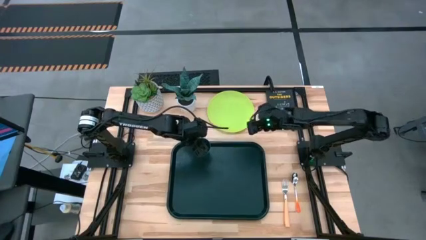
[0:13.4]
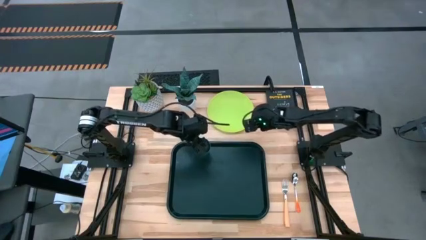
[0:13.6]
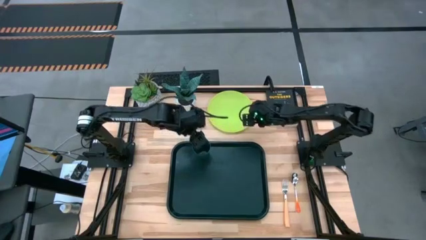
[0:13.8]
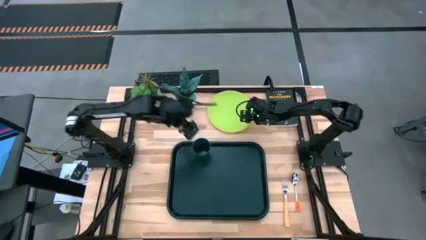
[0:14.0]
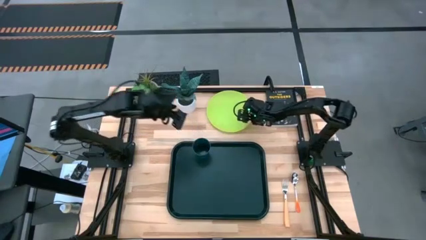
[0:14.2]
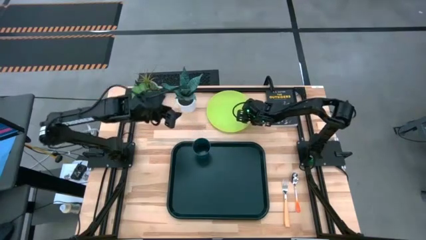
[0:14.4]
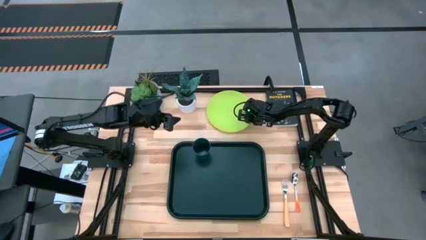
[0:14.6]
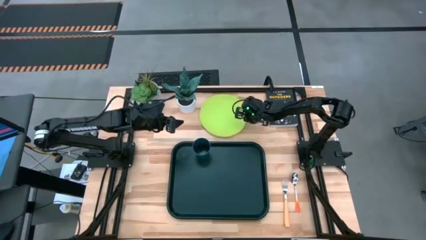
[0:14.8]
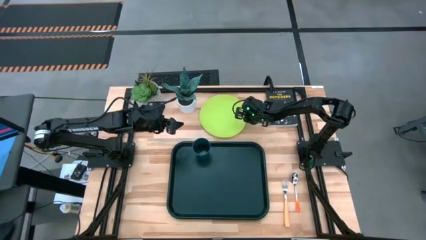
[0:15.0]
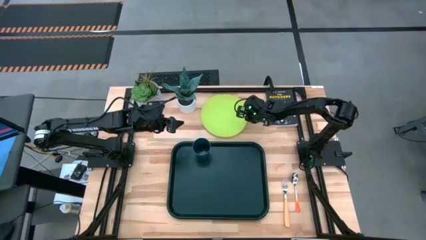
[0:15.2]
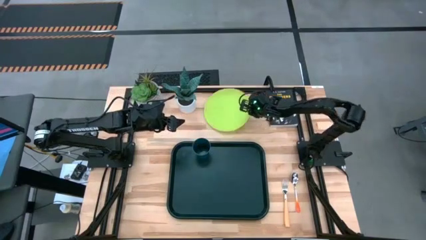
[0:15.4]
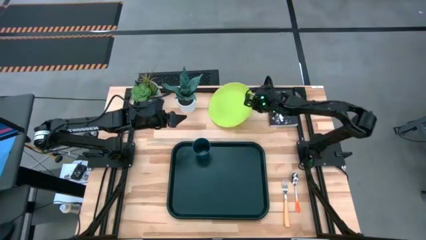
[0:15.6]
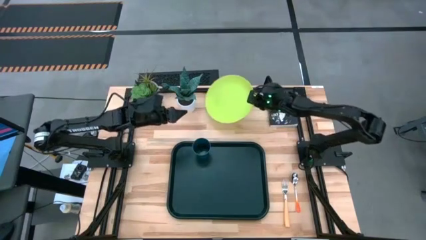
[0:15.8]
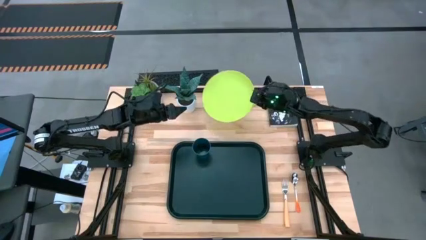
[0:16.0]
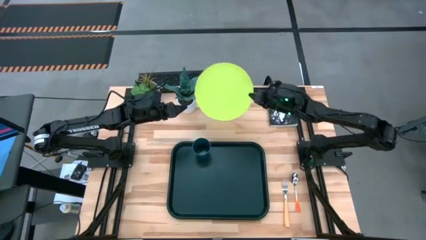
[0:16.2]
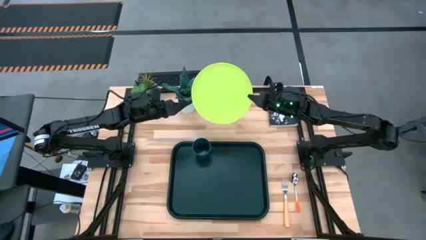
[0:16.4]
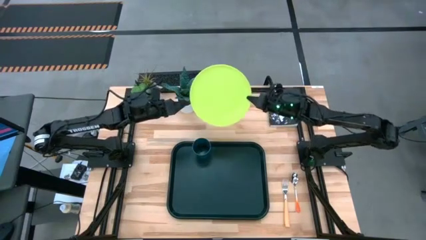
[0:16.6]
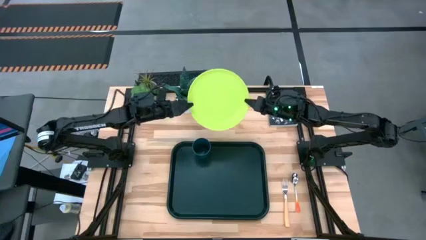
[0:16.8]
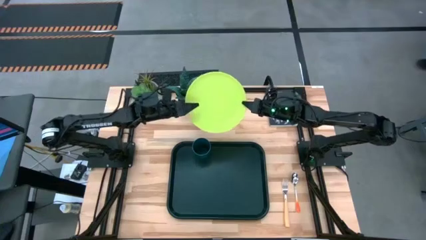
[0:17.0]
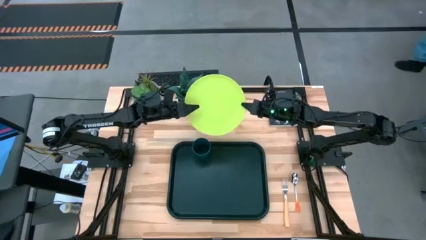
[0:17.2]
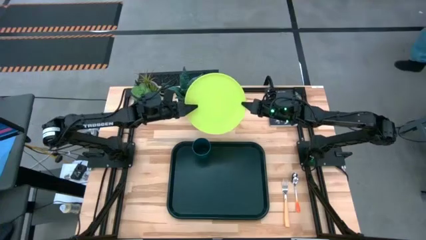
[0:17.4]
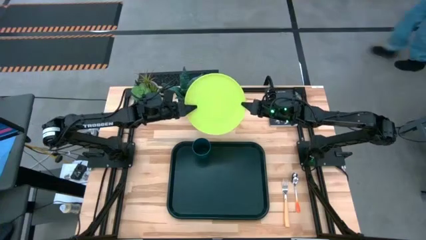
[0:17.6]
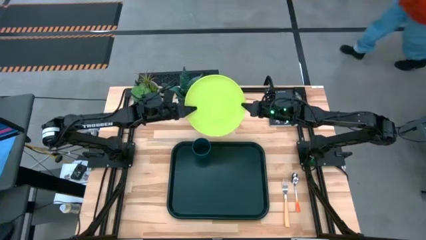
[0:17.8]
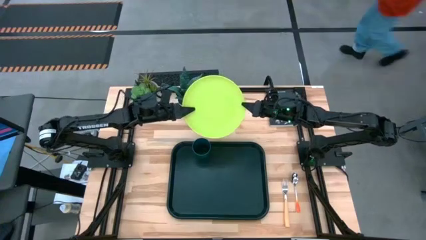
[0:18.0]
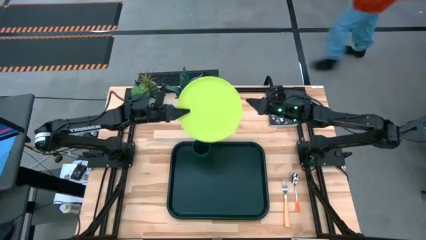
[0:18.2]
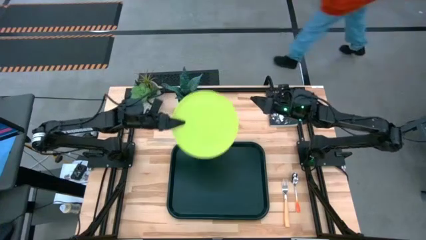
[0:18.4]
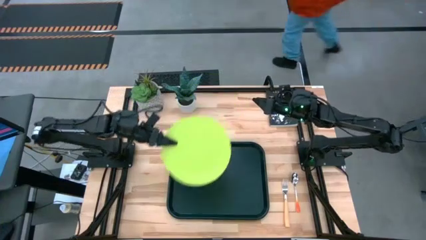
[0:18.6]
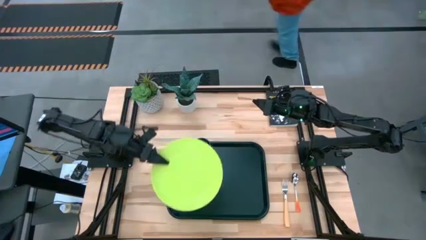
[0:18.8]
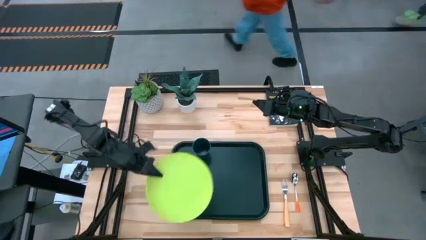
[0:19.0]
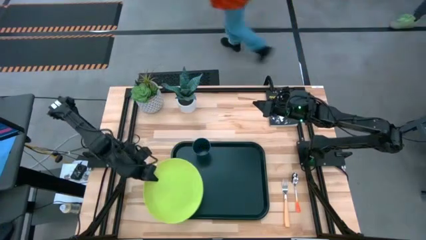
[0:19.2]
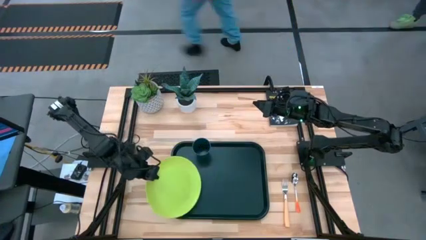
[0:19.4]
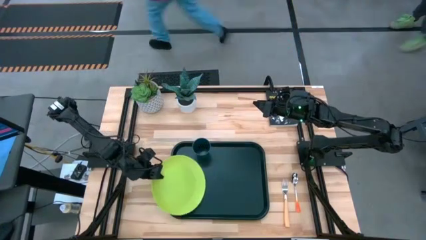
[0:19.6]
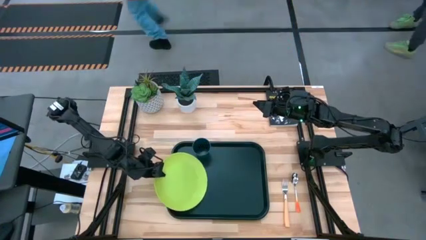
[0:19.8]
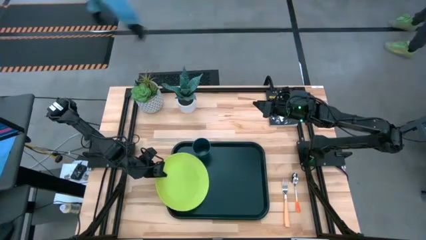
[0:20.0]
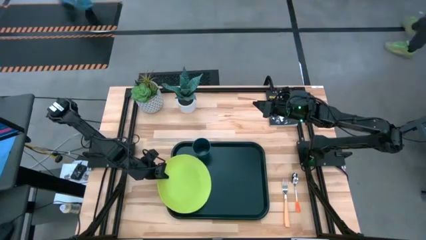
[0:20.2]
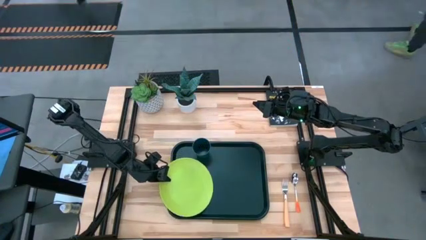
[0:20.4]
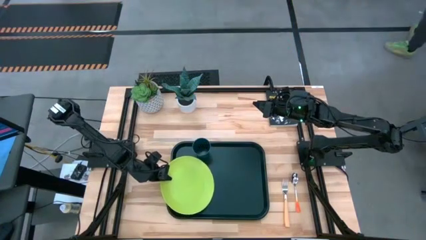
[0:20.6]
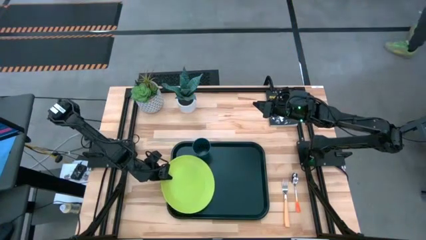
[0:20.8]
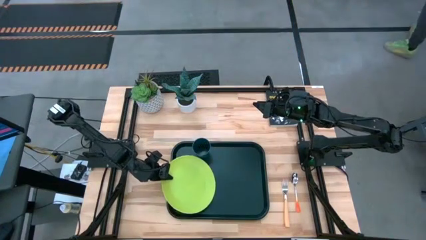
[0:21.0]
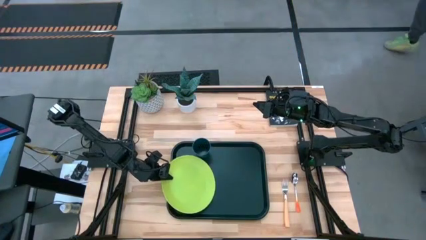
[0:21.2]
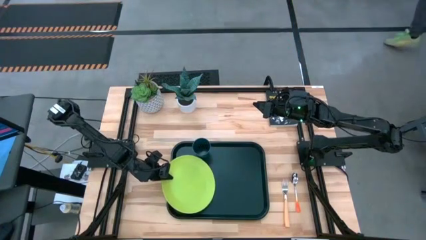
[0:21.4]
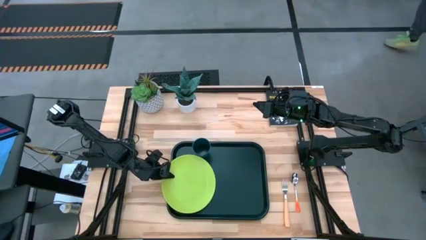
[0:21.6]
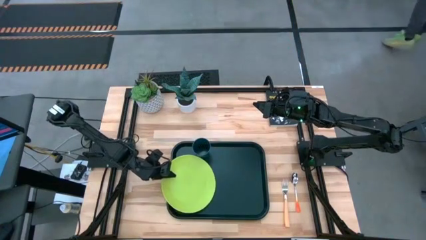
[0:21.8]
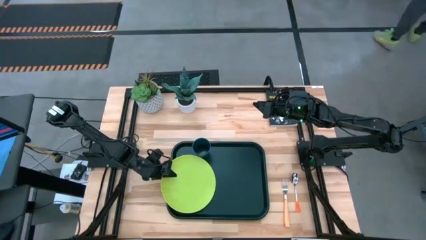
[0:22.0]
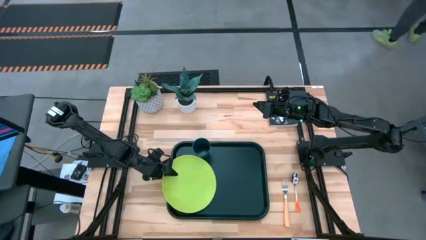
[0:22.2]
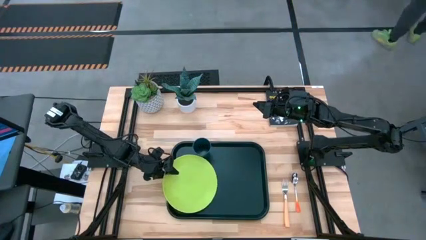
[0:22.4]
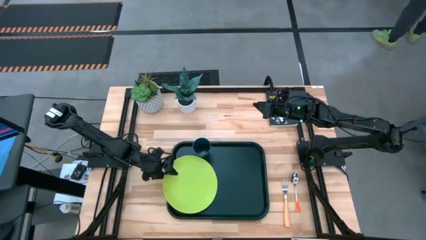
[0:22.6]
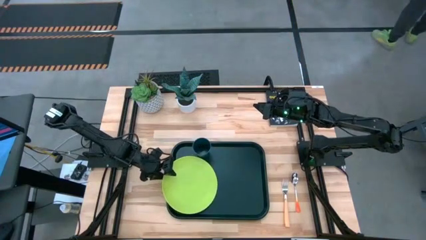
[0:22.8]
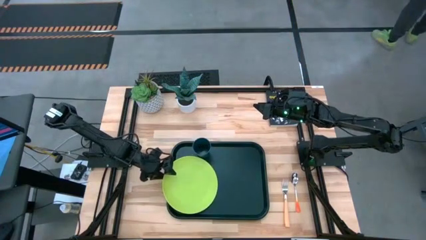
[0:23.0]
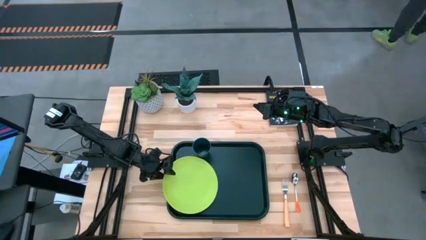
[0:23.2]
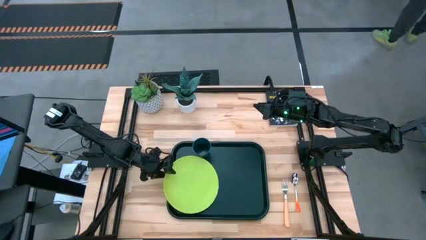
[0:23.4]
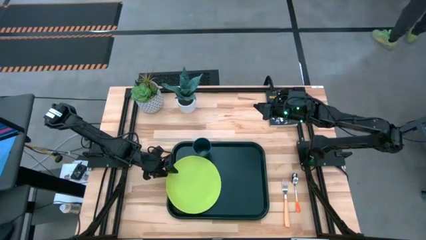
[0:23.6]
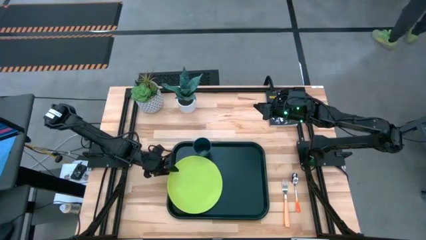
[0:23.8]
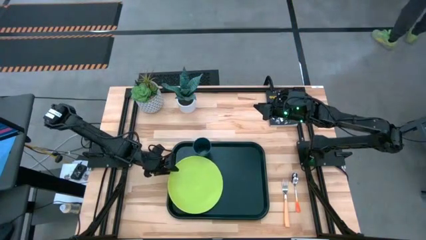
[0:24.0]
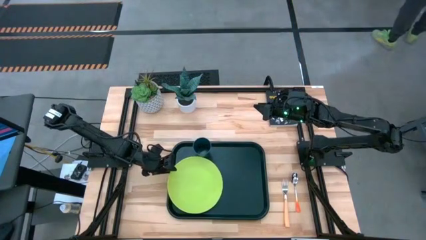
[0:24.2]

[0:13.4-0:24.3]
Task: Pick and place plate/cup/fork/spoon on tray
Put the green plate on the black serving tray below the black cup
